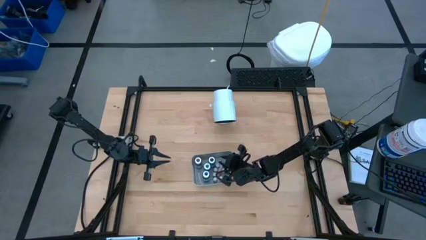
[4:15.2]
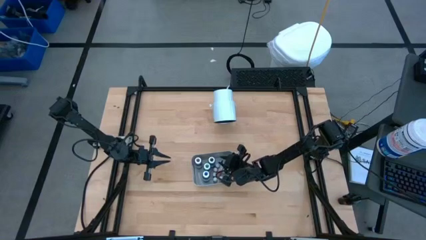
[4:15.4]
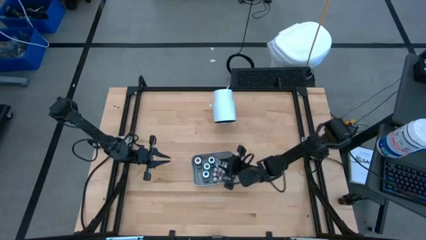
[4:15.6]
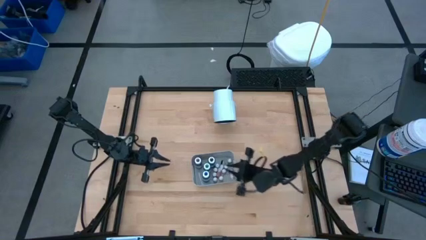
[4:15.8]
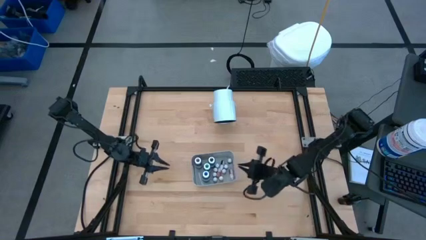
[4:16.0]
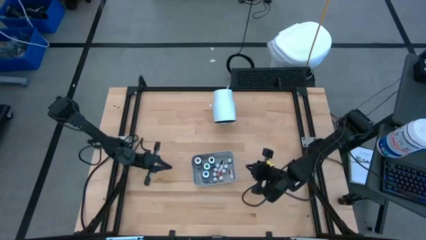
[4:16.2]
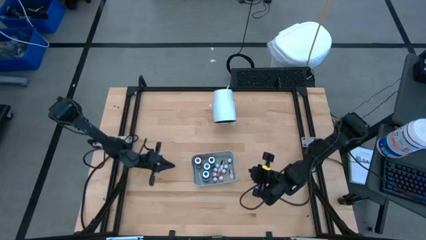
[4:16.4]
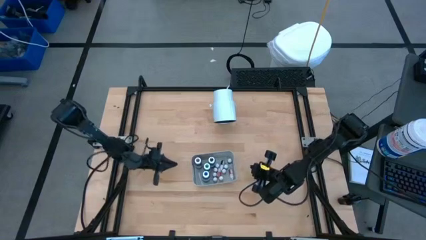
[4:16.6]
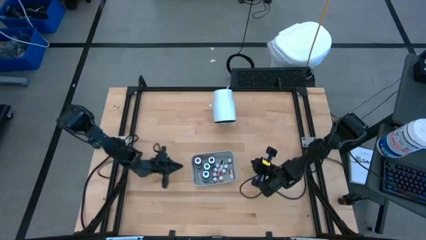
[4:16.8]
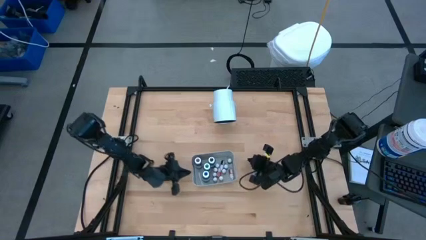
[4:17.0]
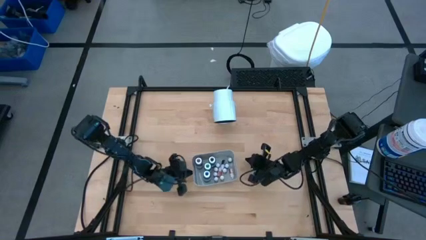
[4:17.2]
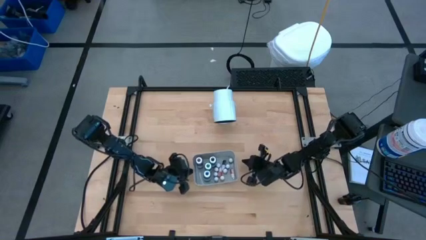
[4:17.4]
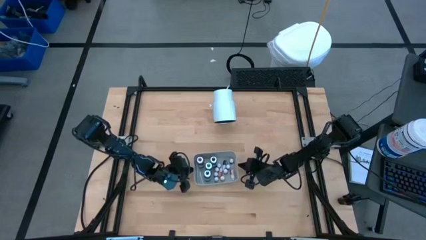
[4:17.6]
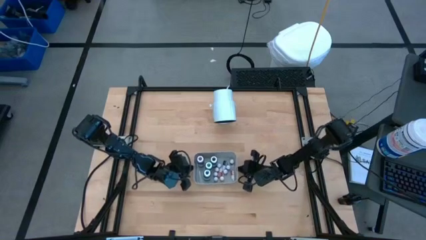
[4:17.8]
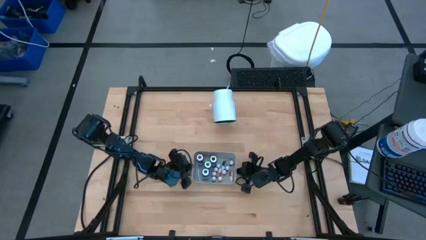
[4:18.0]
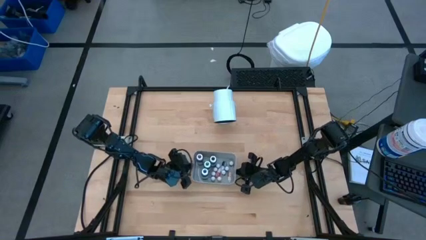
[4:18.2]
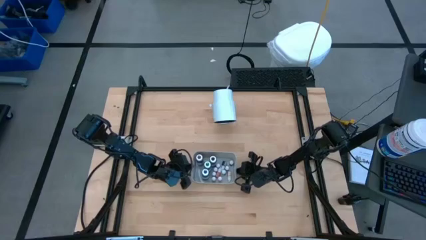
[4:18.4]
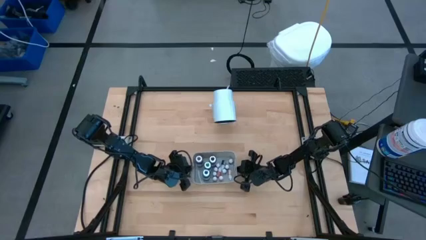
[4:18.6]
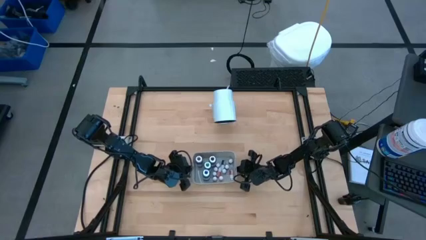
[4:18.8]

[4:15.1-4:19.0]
Task: Pick & Place food coloring
Adjust the gray bin

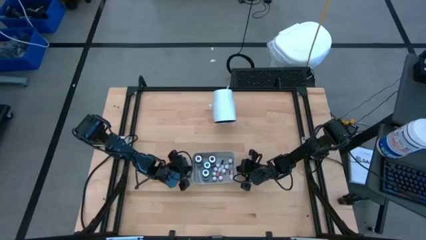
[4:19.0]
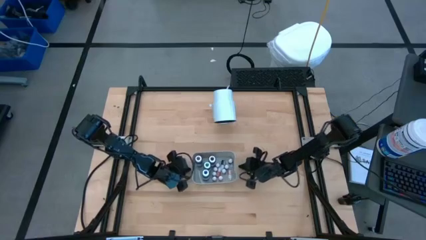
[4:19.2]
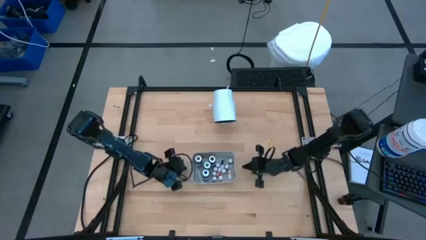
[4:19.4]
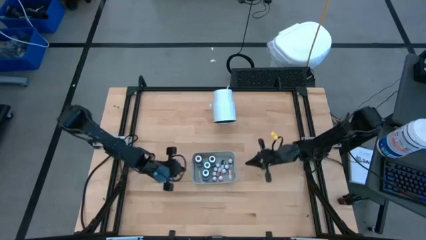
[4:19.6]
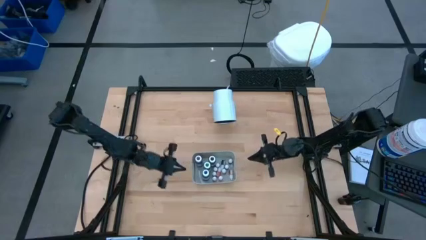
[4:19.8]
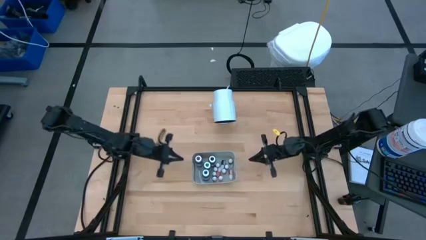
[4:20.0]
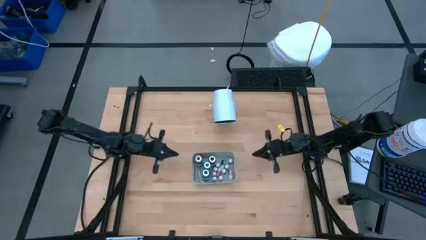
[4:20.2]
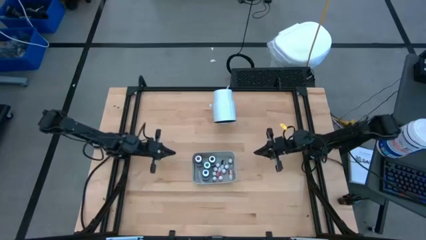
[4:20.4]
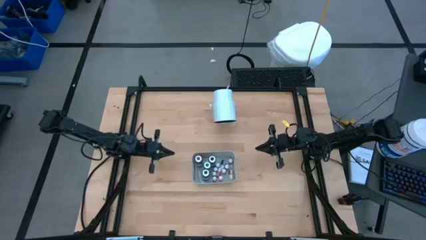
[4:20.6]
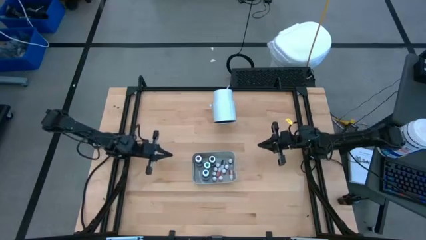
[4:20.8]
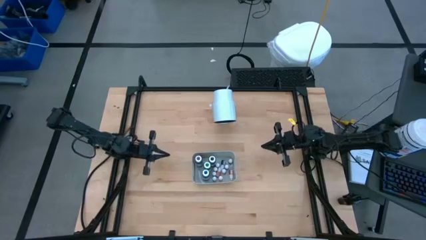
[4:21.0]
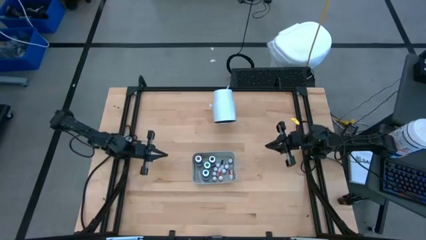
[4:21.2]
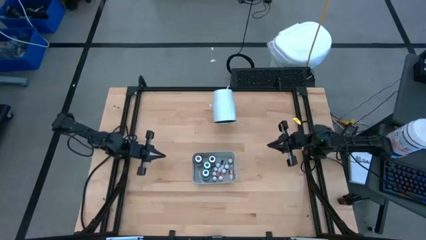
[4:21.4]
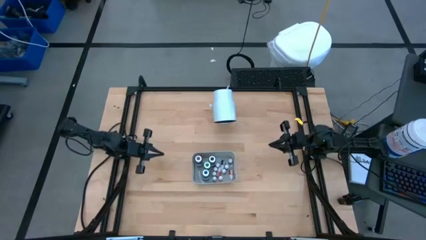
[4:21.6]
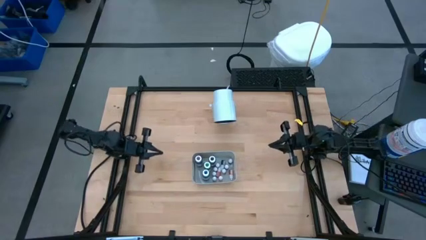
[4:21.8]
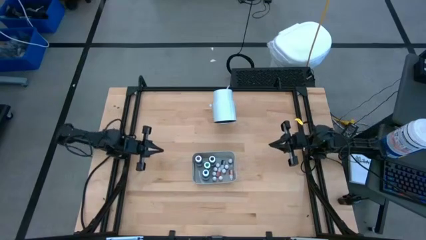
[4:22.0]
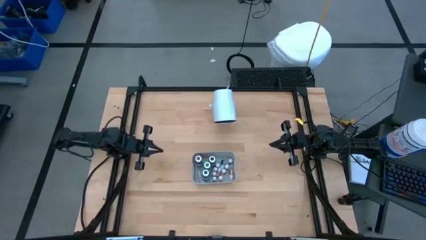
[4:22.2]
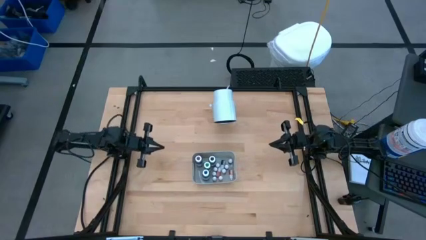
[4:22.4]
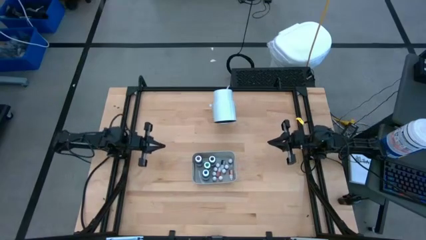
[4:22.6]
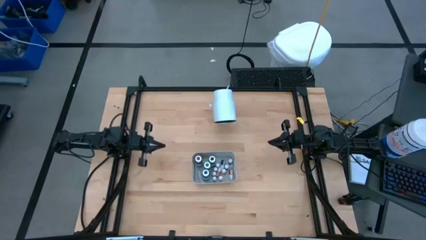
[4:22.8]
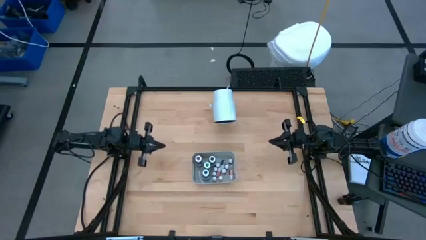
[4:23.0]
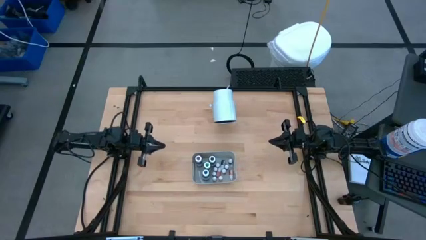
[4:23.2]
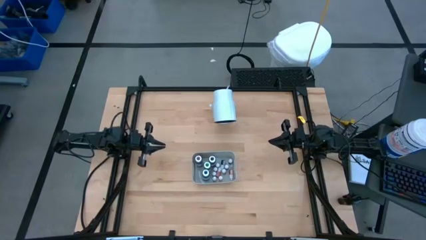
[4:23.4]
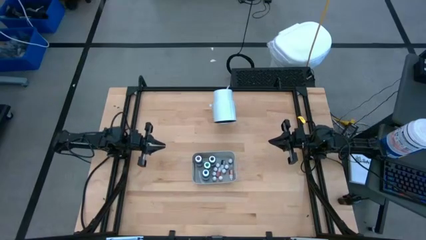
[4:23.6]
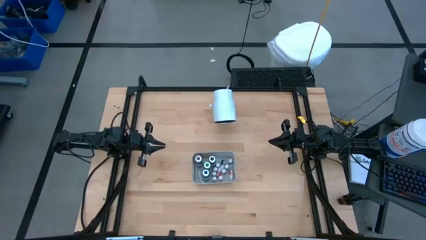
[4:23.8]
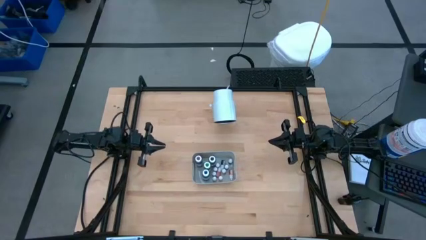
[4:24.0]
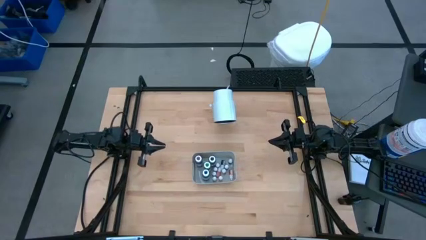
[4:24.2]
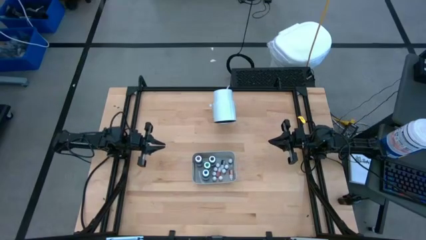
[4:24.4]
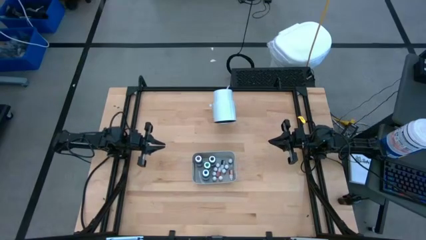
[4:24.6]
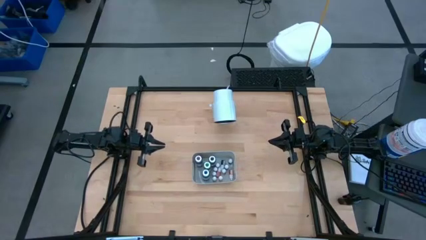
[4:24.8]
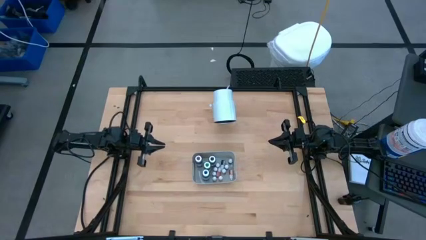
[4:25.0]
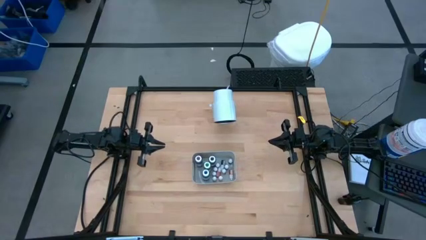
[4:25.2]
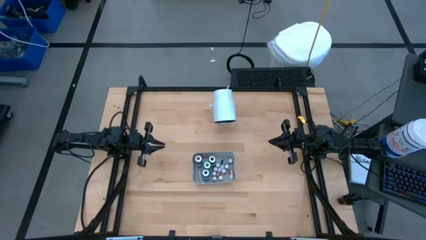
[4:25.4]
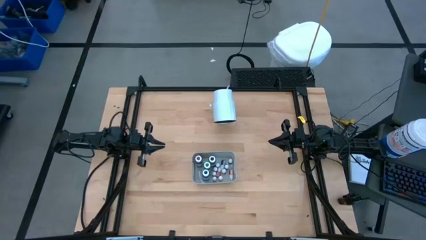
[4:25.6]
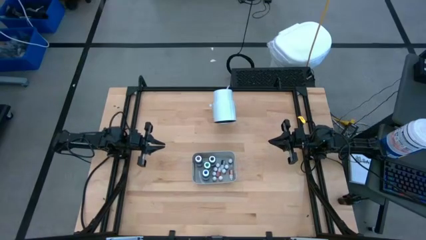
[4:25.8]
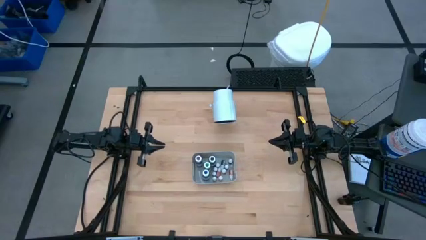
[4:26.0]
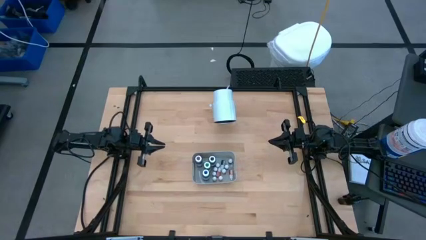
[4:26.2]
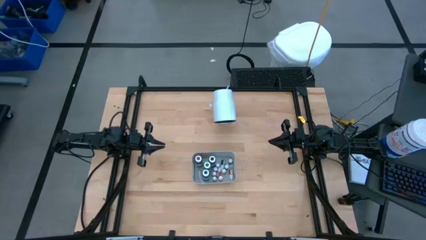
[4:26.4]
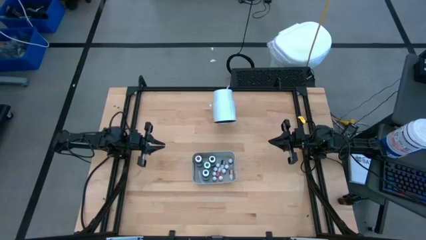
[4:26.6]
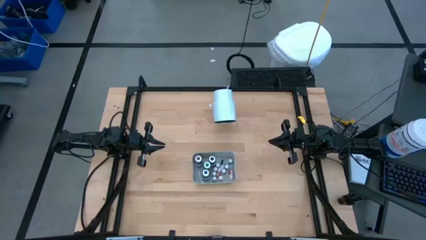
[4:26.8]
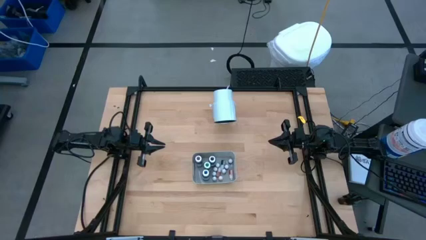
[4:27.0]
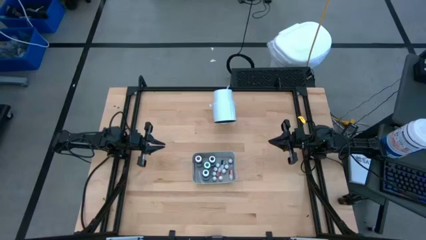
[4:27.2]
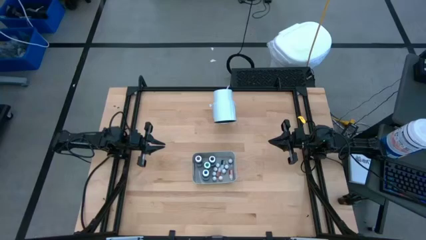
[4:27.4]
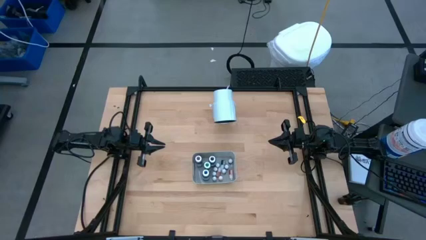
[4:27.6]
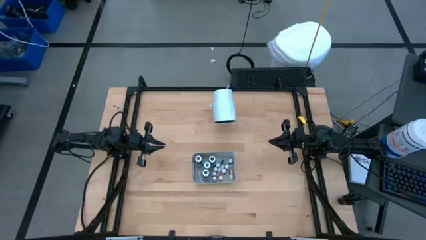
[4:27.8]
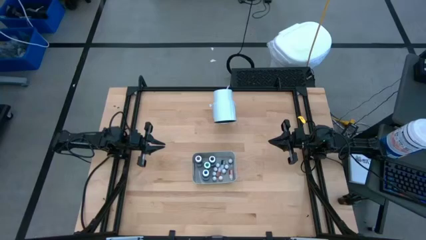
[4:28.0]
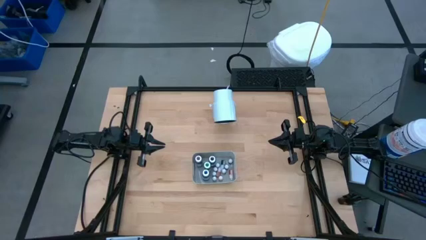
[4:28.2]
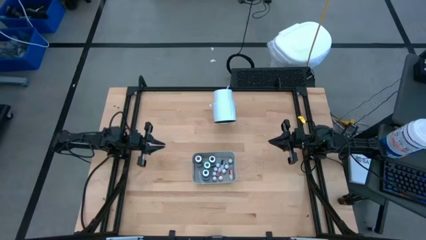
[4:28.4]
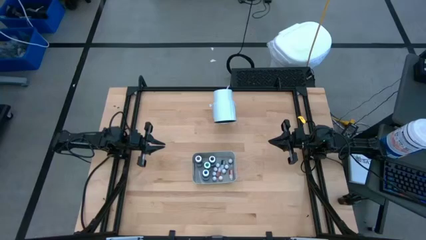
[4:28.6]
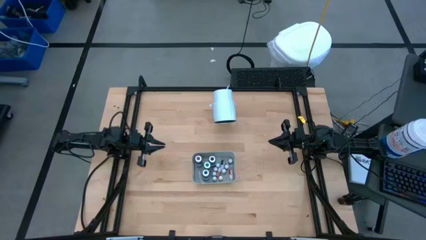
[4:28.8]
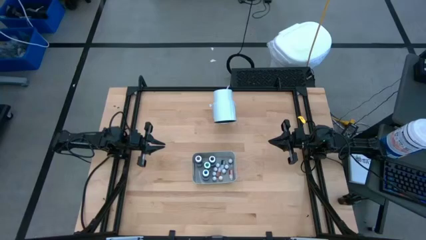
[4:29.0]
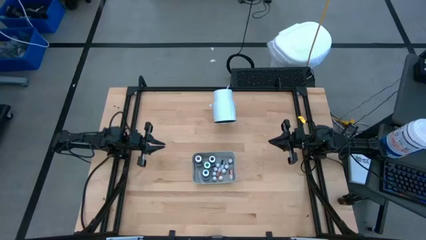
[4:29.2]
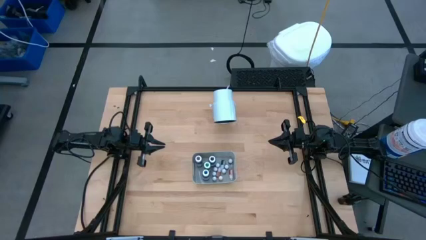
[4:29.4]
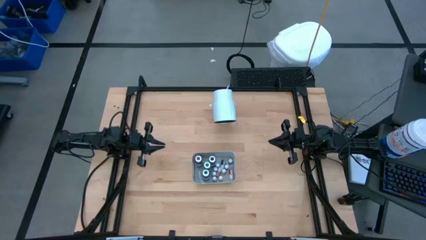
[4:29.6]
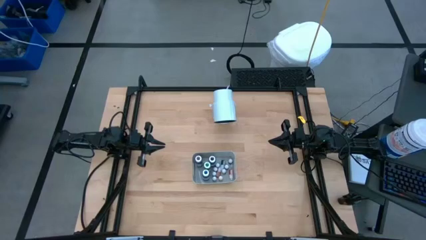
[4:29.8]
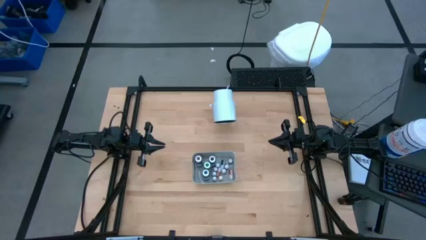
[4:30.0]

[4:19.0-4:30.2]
Return to Home Position
